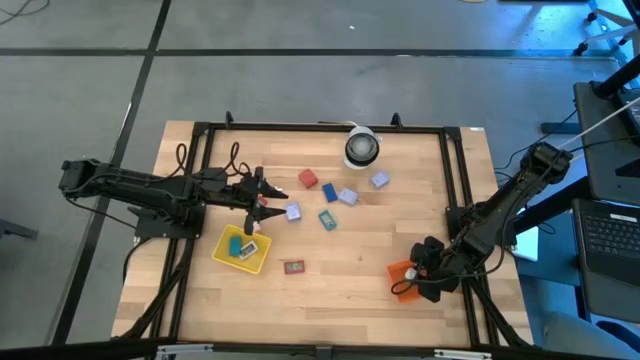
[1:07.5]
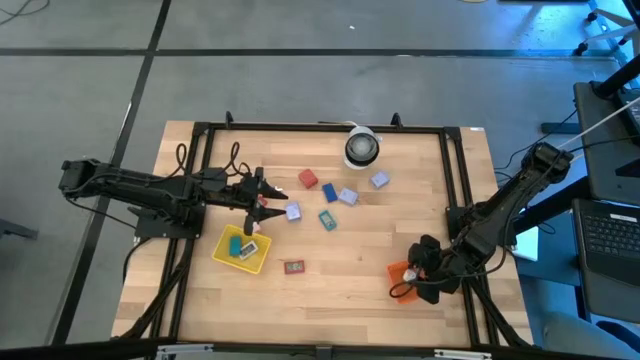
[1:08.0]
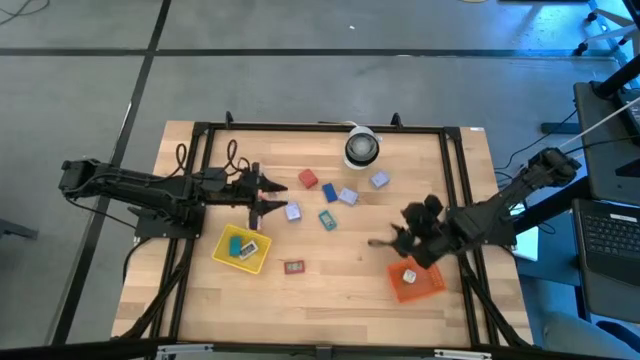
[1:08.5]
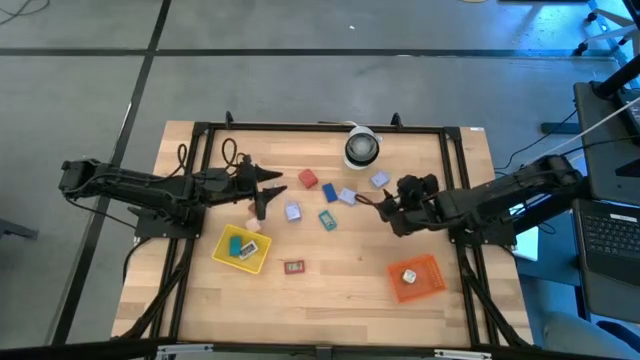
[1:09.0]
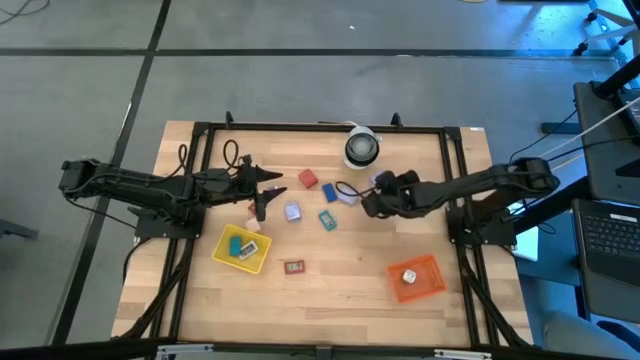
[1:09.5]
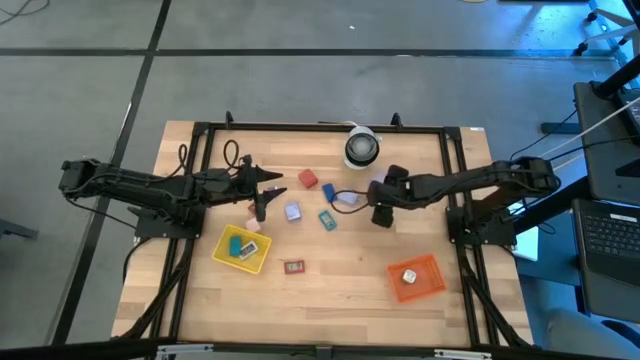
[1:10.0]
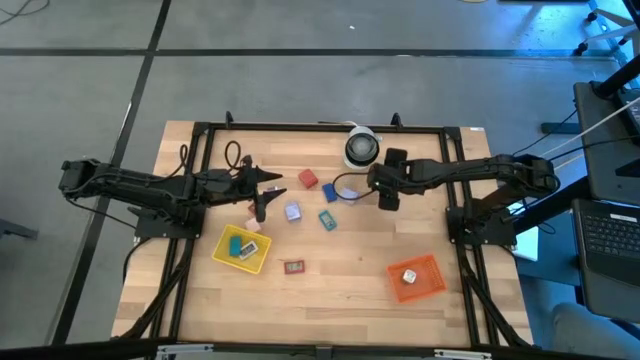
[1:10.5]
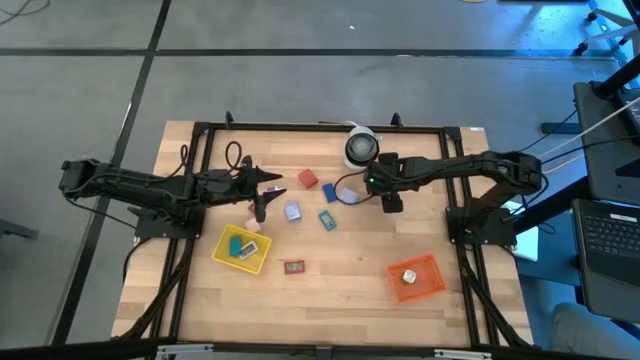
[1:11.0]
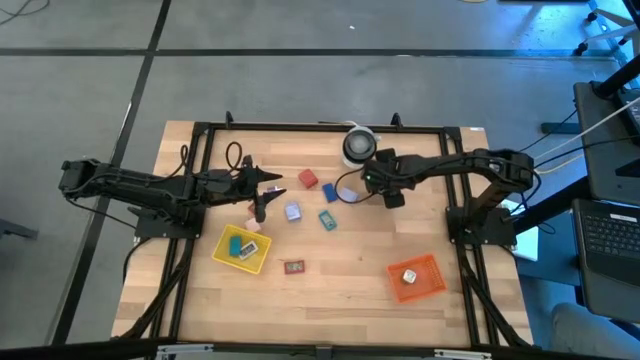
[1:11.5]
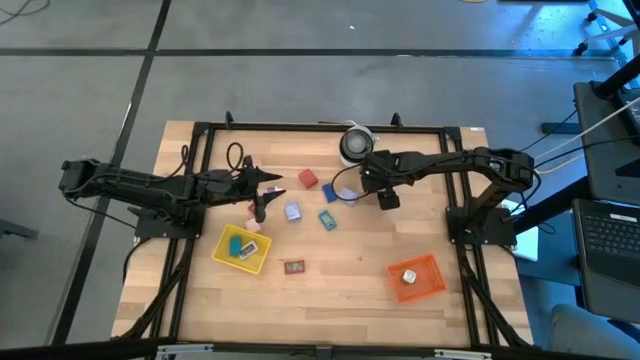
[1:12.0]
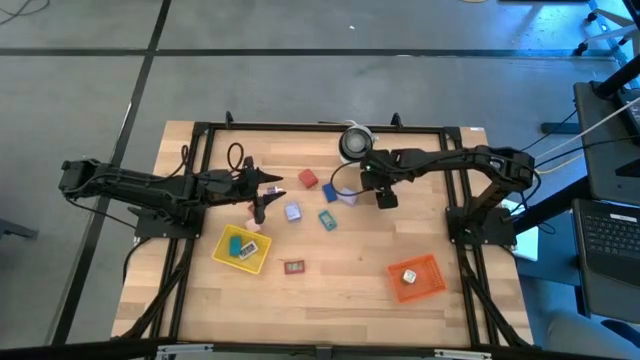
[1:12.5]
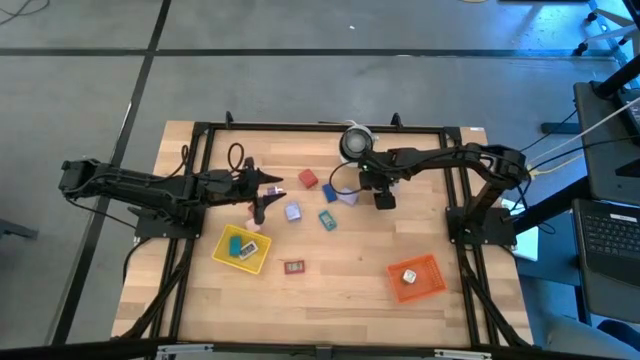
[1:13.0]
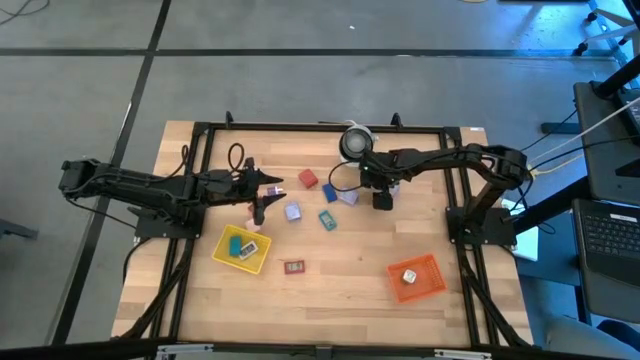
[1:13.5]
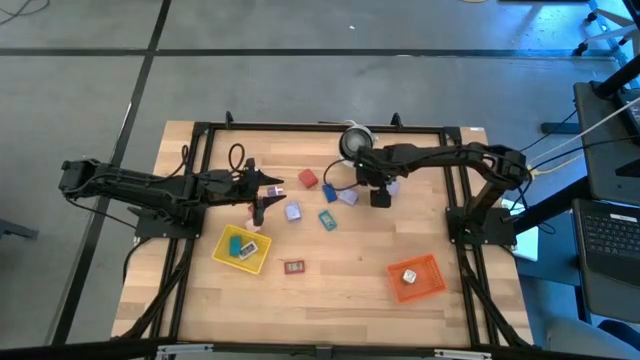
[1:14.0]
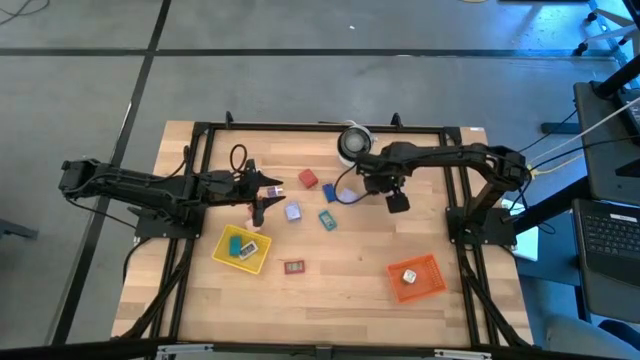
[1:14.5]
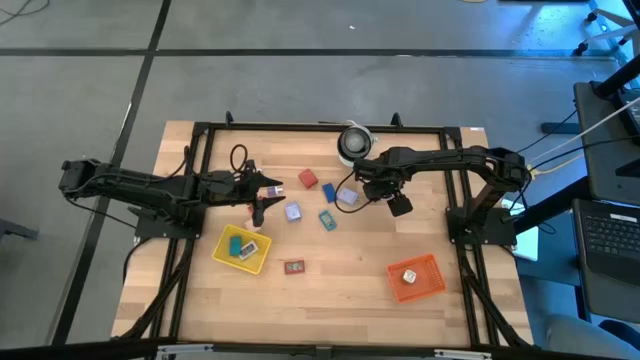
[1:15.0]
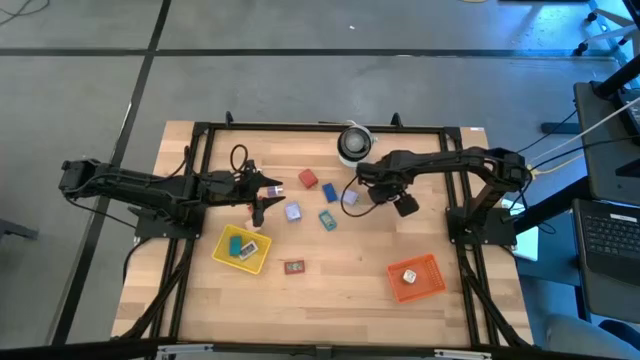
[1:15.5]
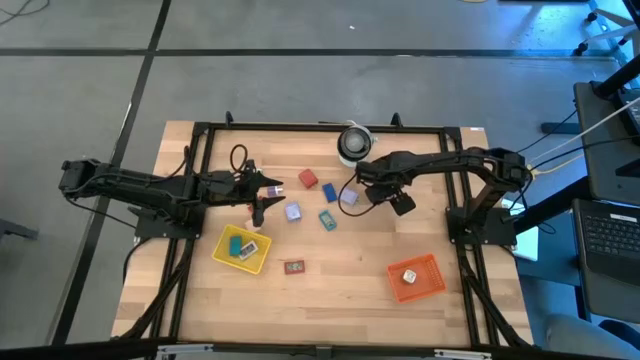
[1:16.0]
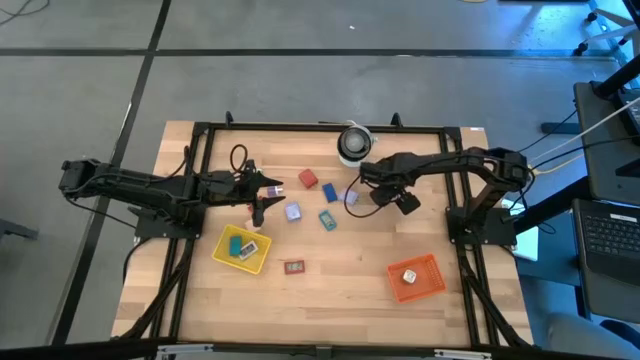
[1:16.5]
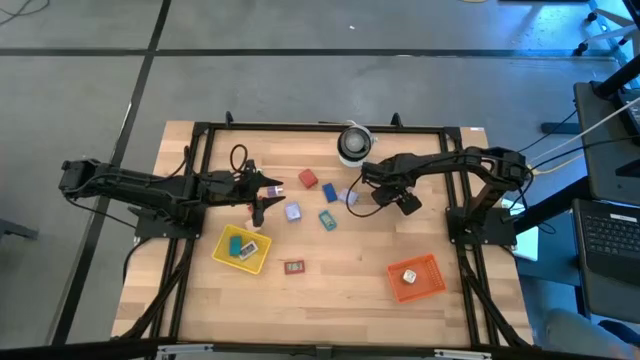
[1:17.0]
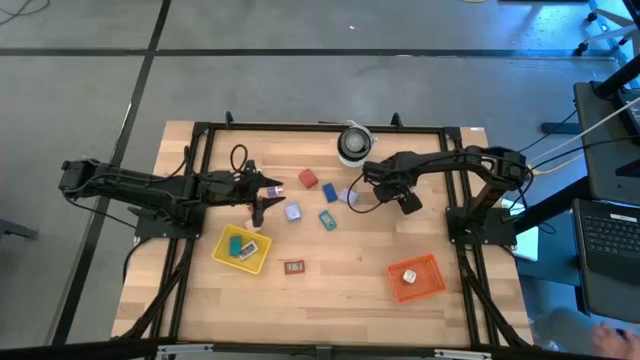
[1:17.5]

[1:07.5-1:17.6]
Task: Pick & Place Office items
Put the right violet charger adapter into the orange bin

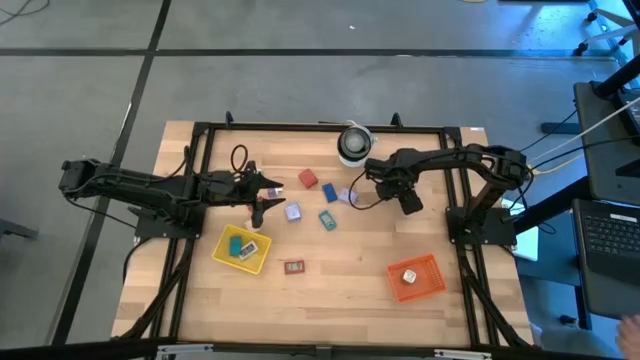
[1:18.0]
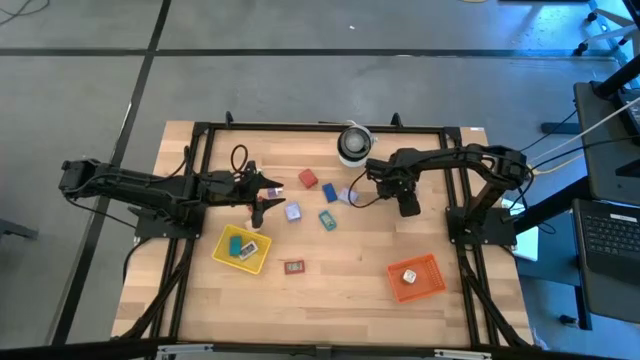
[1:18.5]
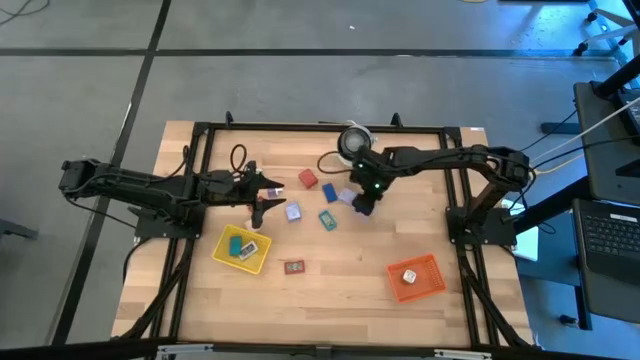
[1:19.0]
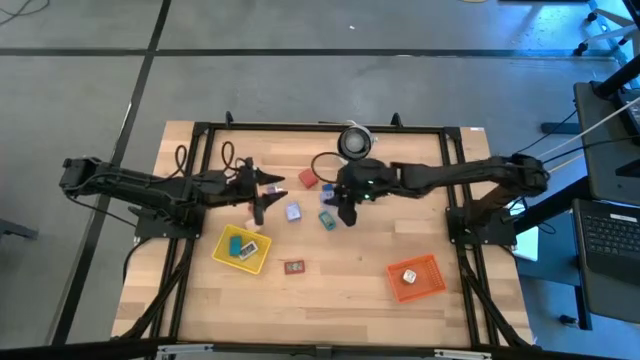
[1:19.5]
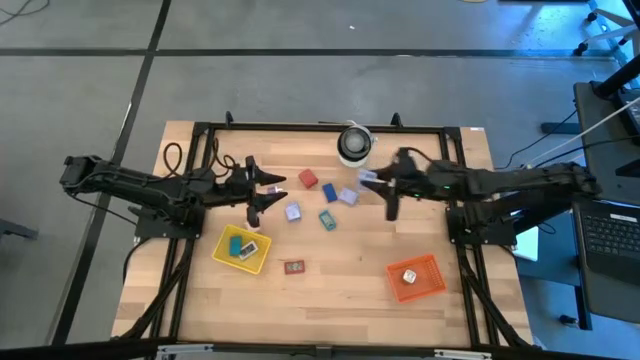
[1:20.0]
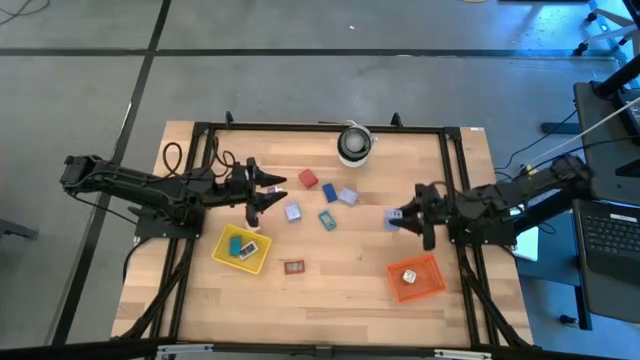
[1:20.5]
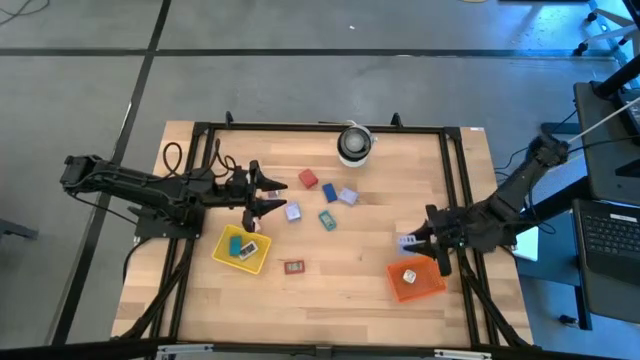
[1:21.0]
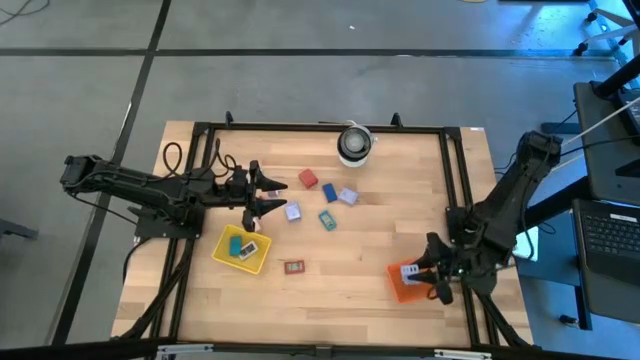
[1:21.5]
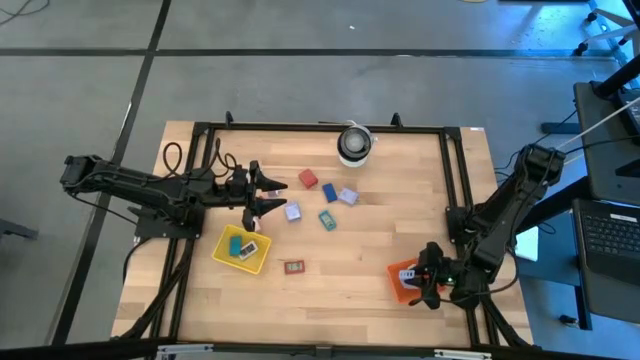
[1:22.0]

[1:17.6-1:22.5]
Put the right violet charger adapter into the orange bin
